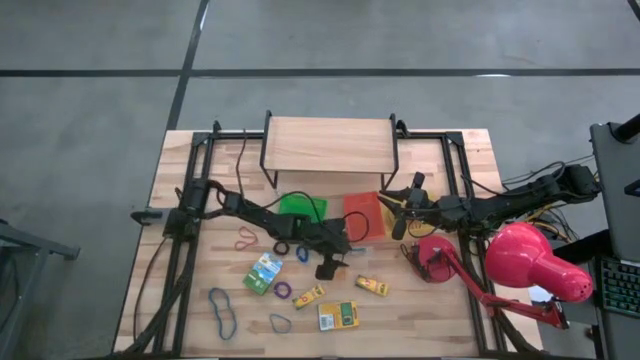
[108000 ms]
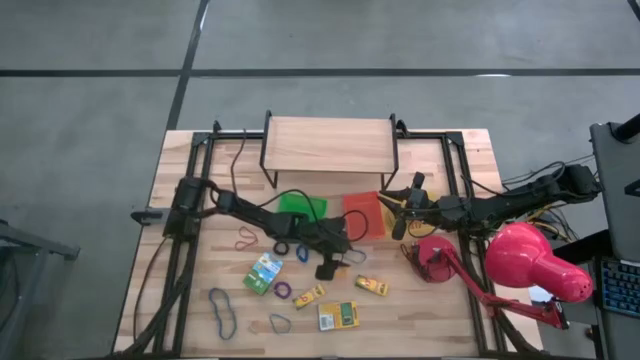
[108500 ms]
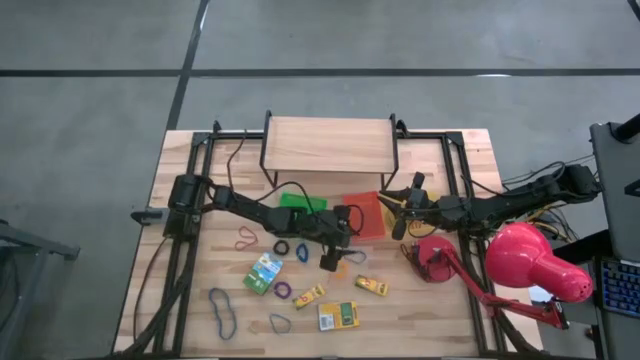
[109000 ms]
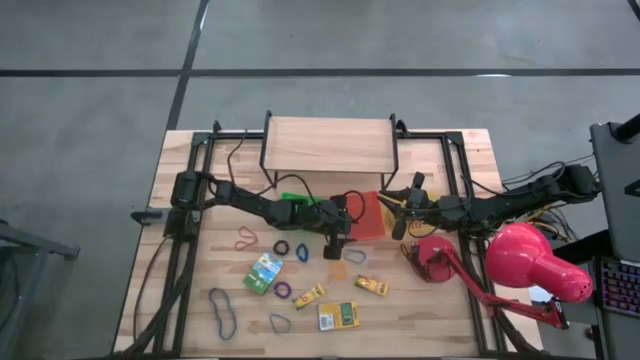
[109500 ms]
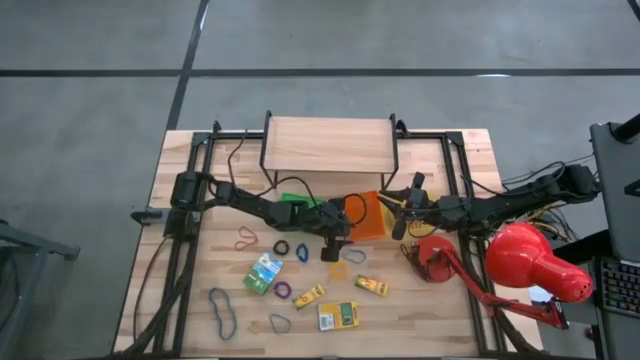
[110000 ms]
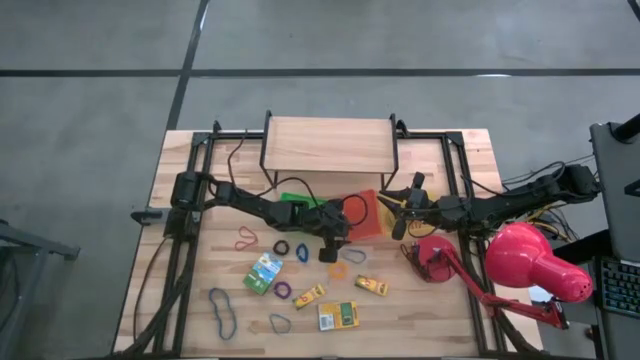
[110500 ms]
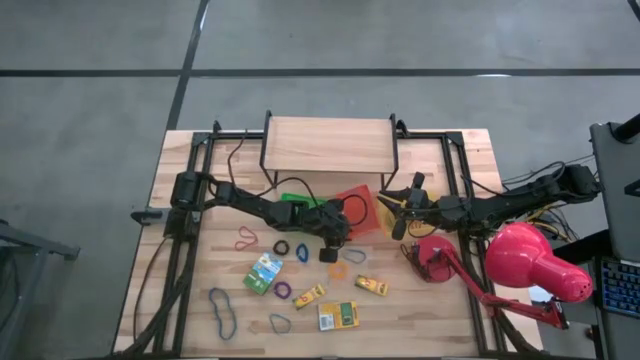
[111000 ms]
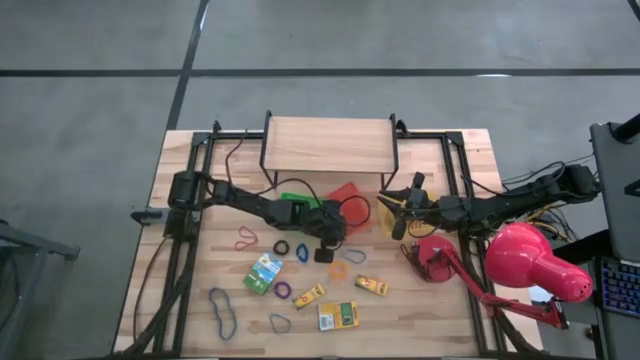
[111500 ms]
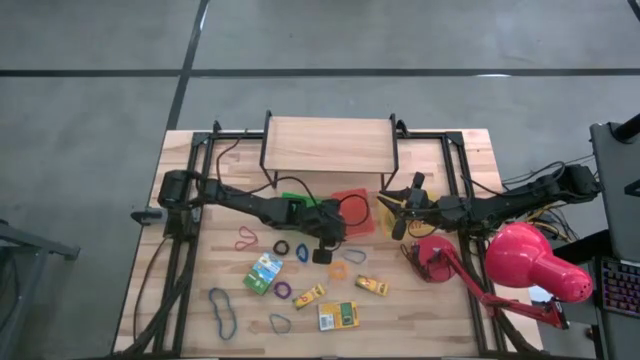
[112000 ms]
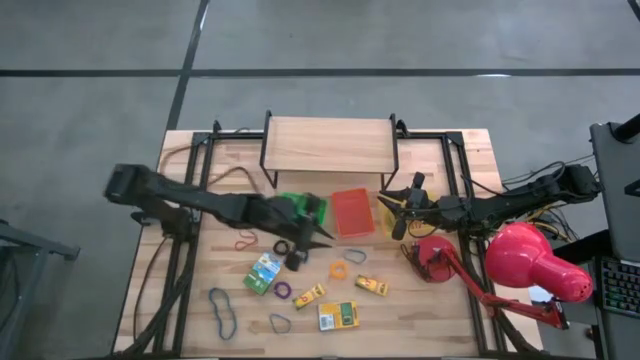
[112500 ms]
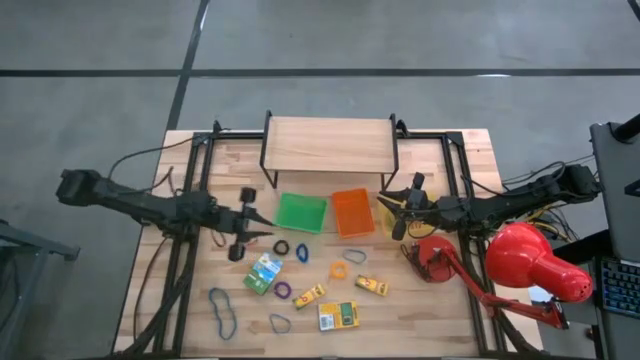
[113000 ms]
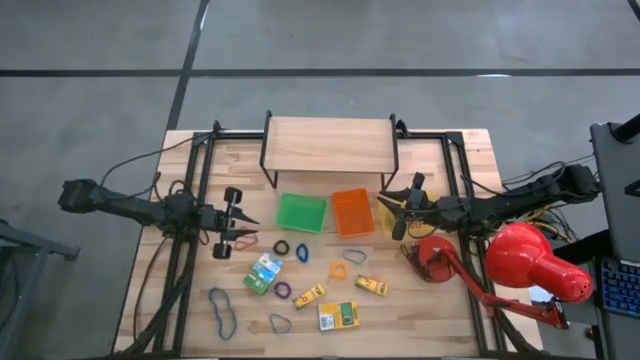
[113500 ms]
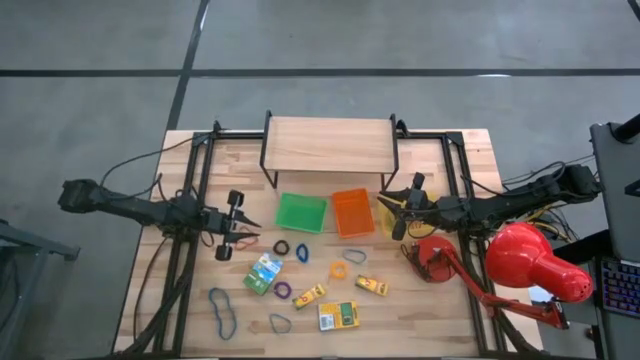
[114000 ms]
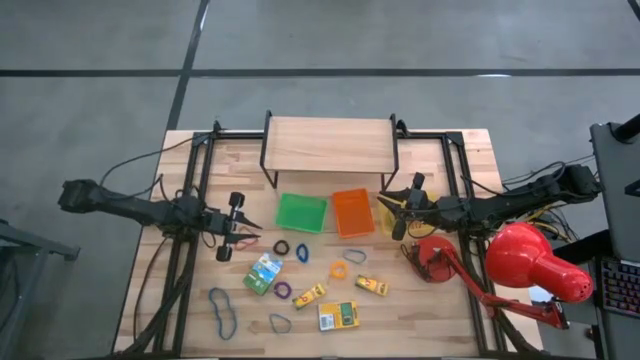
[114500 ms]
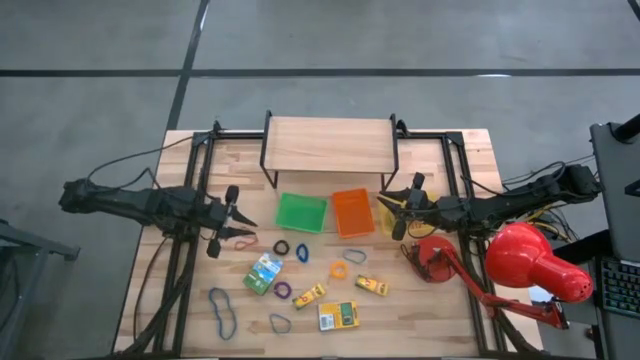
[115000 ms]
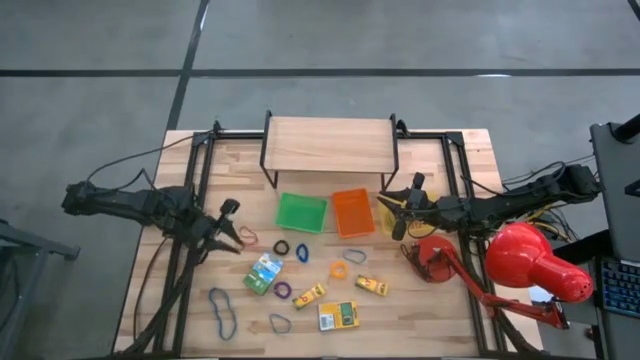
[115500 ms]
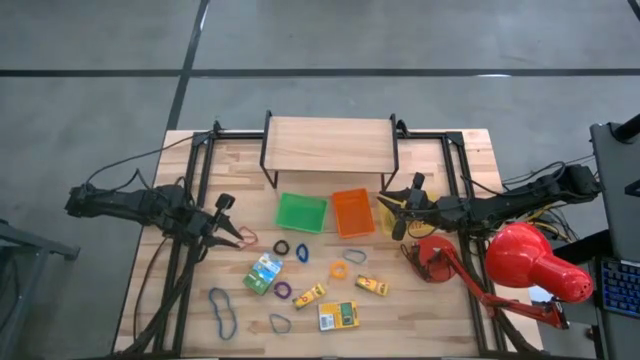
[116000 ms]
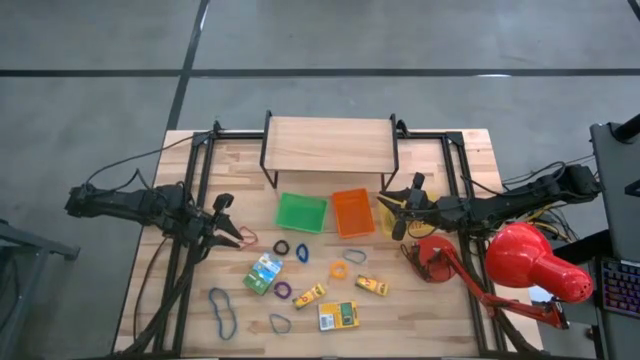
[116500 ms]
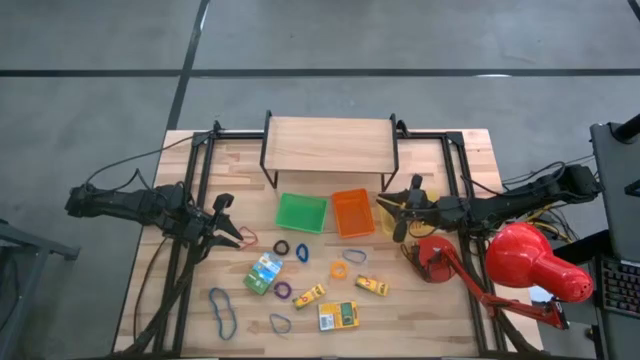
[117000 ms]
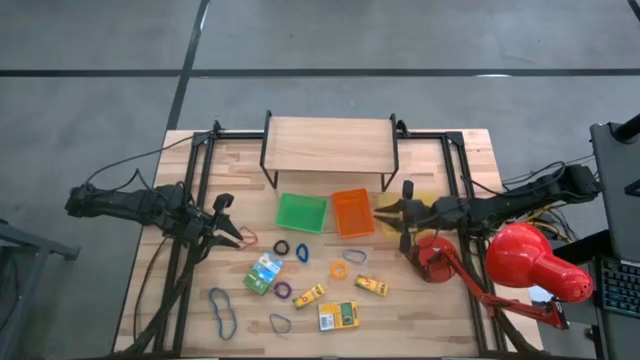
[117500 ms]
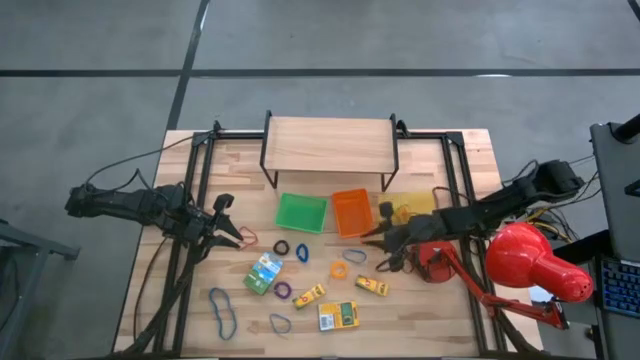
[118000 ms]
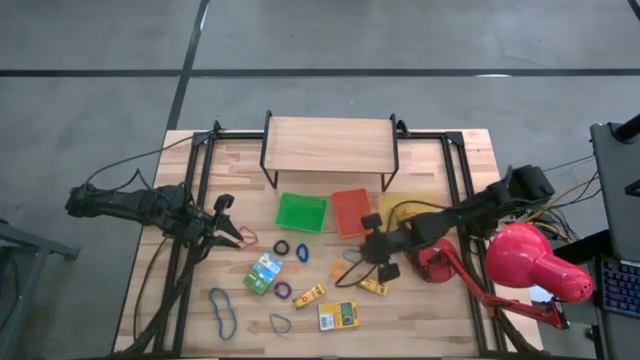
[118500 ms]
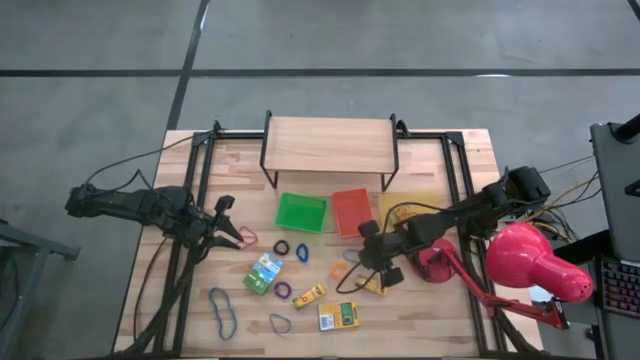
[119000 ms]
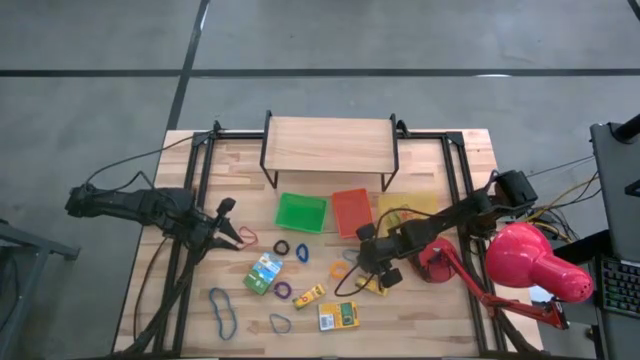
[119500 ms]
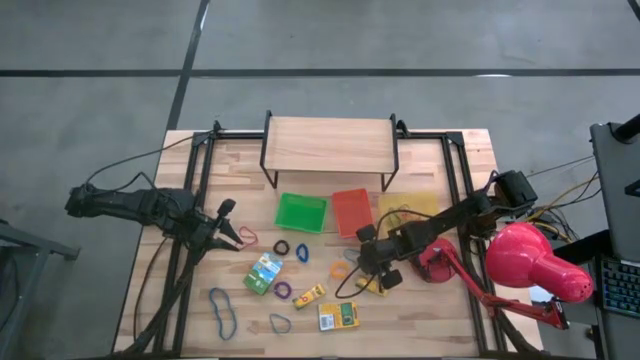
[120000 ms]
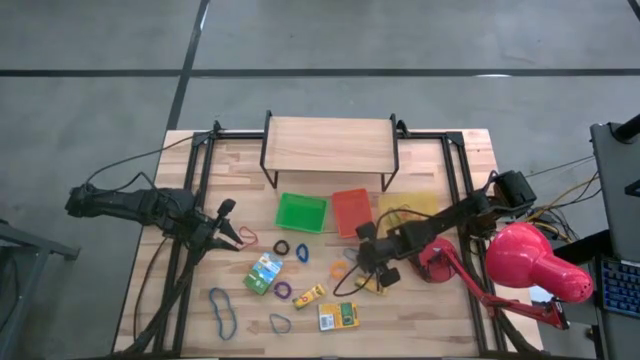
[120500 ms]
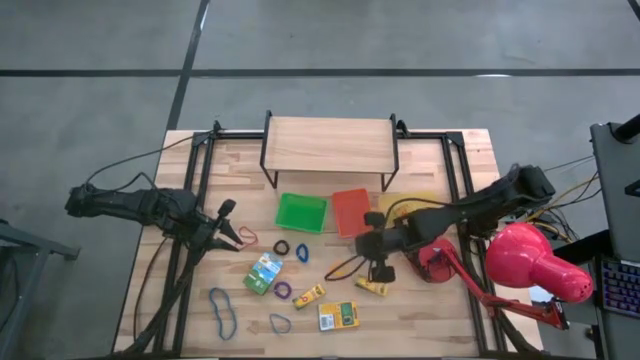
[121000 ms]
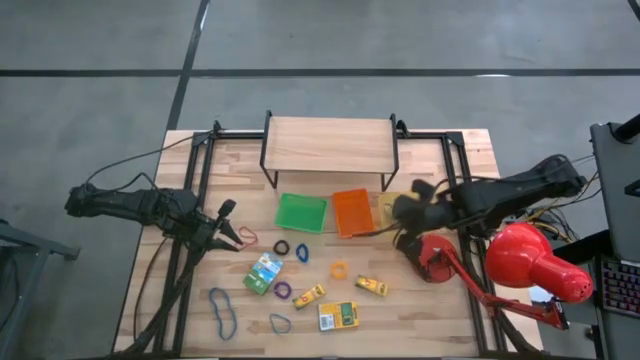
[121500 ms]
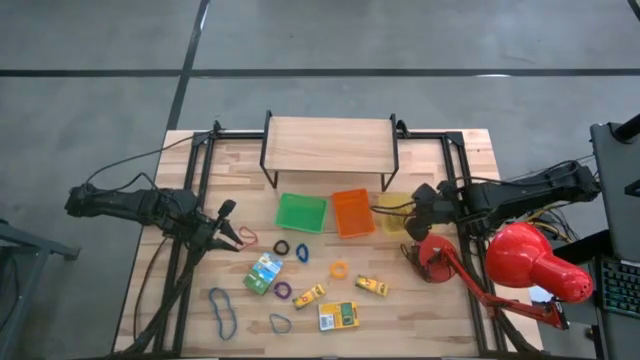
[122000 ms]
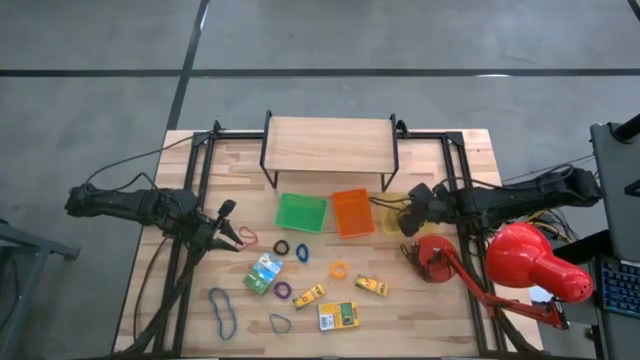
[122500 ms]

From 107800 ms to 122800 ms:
Task: Pick & Place Office Desk Supplies
Put the top blue rubber band into the yellow bin

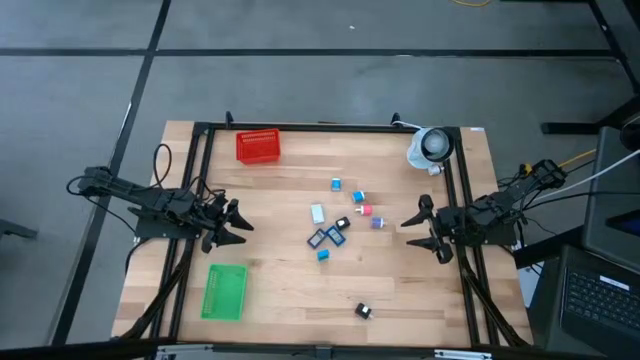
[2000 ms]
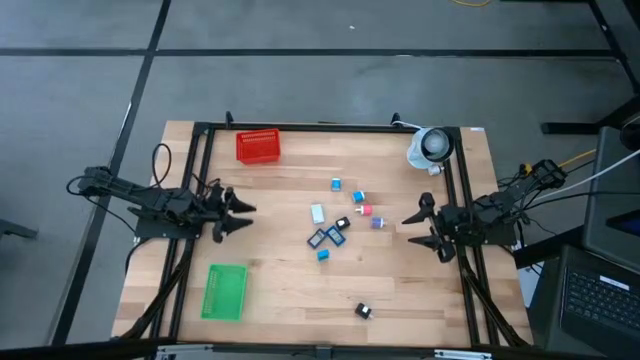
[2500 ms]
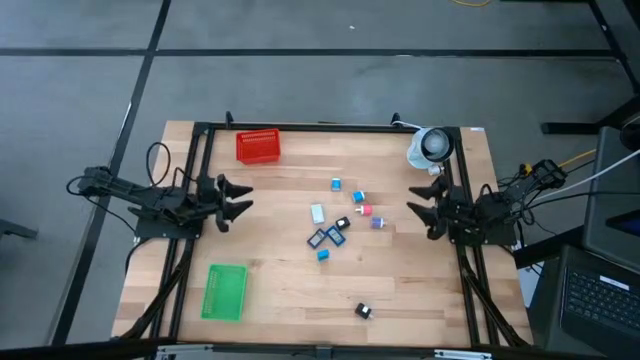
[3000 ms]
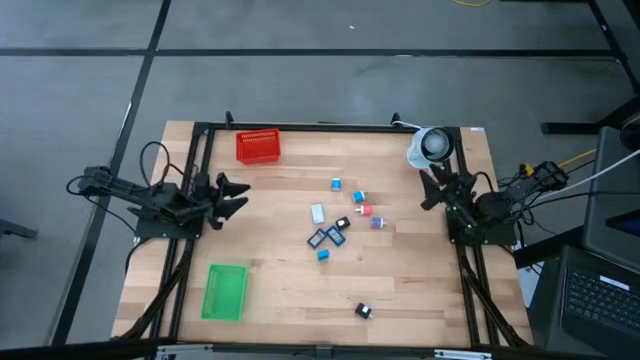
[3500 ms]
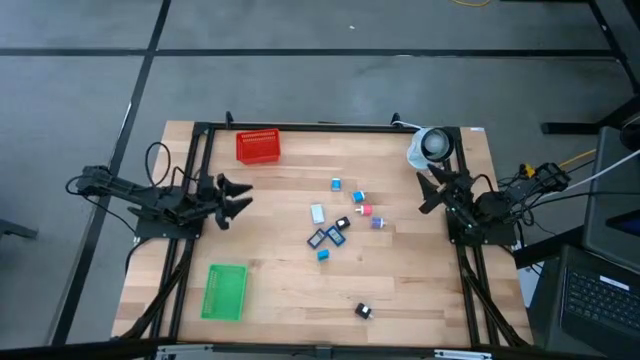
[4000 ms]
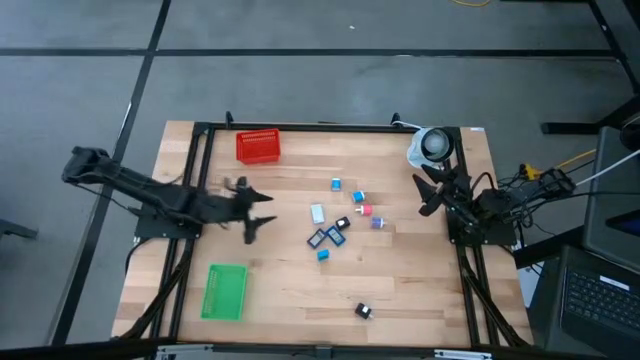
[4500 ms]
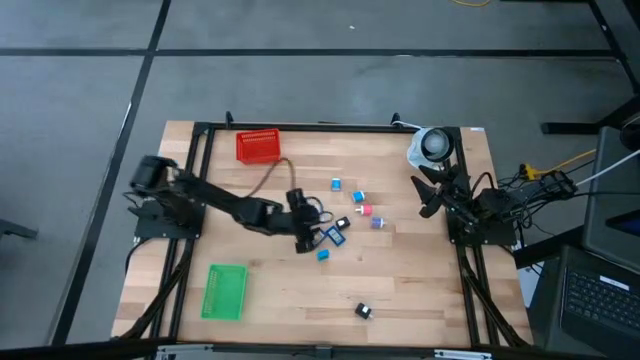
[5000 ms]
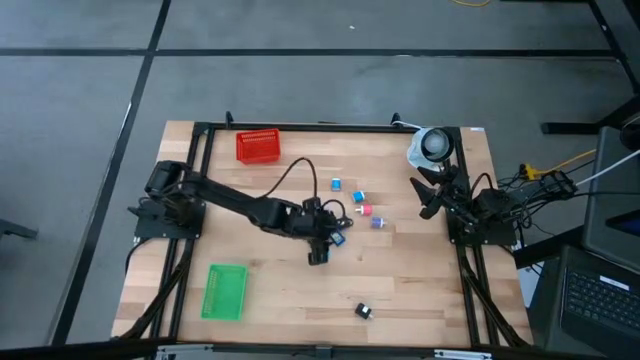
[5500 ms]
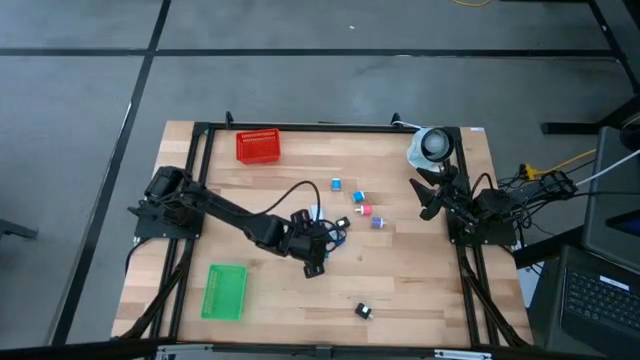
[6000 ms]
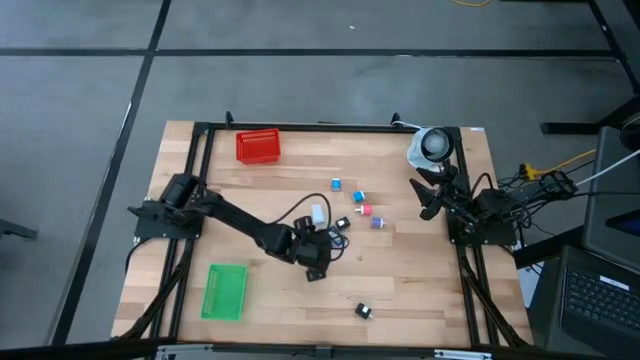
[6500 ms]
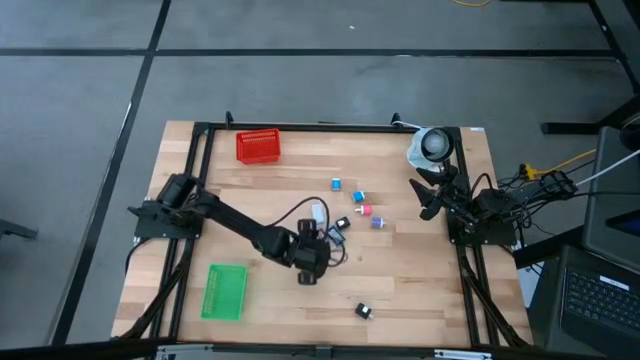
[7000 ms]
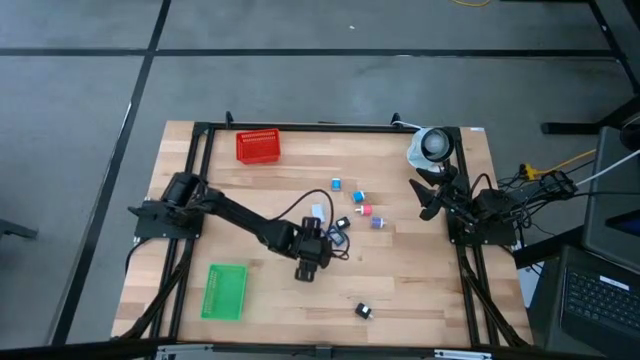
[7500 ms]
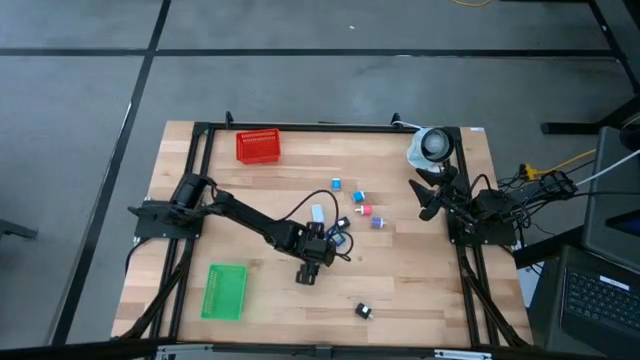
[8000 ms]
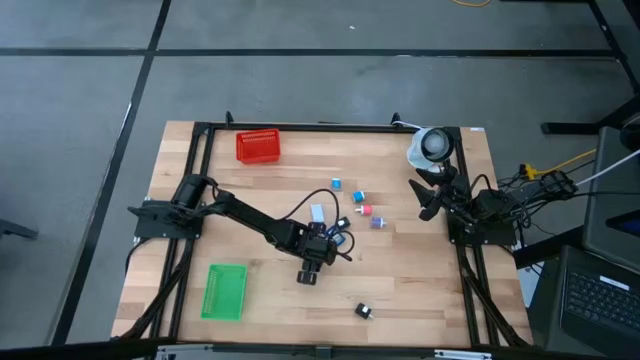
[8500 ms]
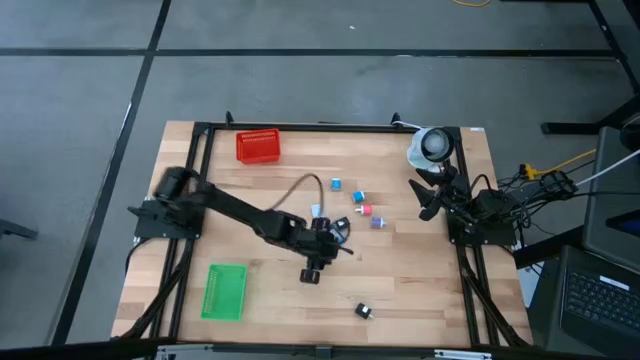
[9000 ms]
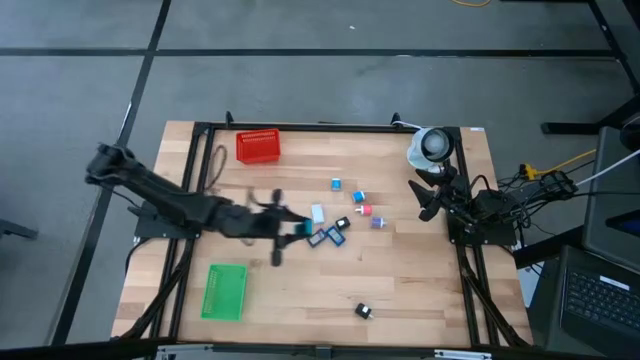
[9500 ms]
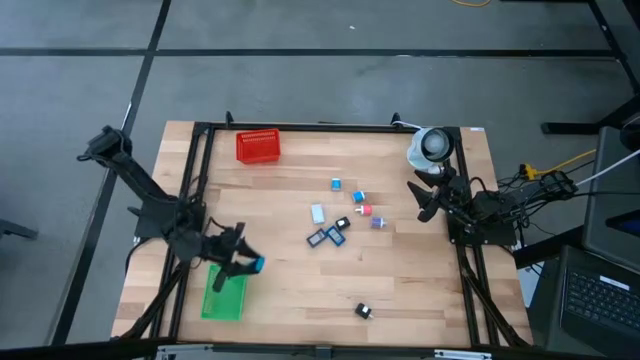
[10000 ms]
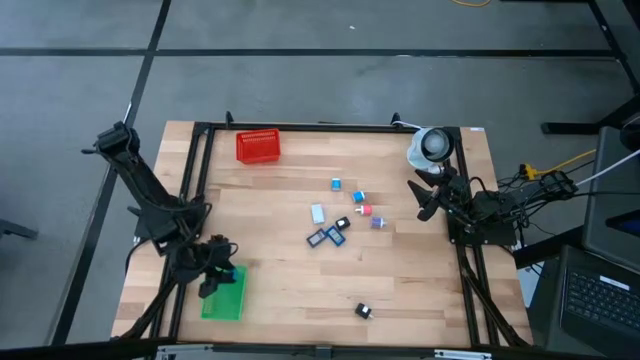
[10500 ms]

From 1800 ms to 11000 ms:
Task: Pick & Place Office items
Put the light blue digital timer into the green bin
